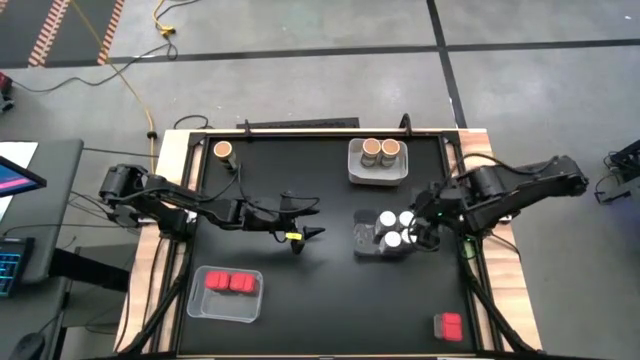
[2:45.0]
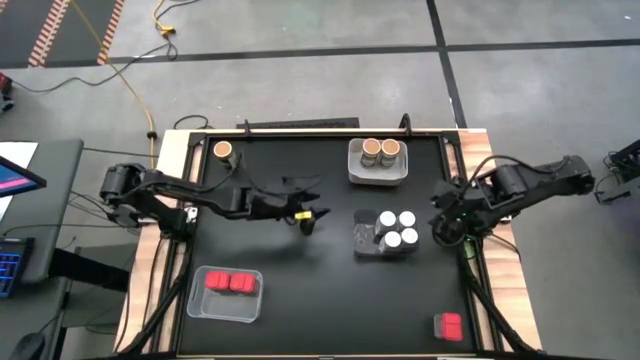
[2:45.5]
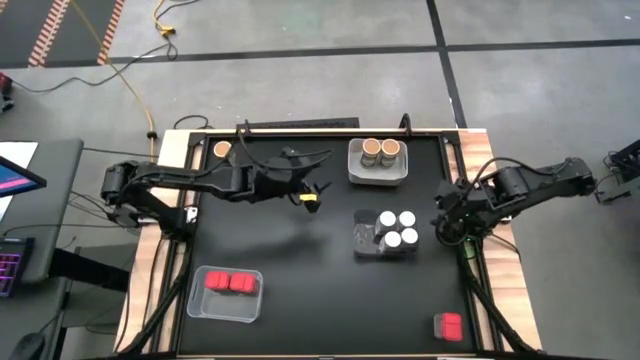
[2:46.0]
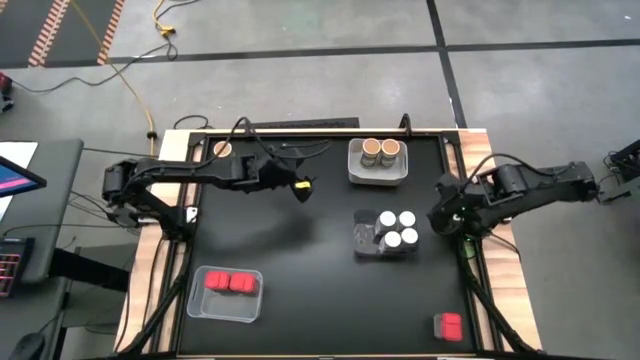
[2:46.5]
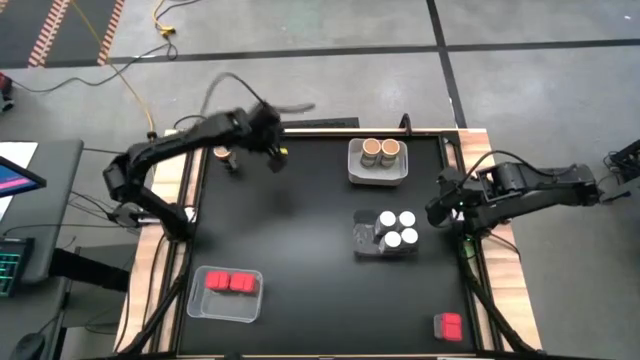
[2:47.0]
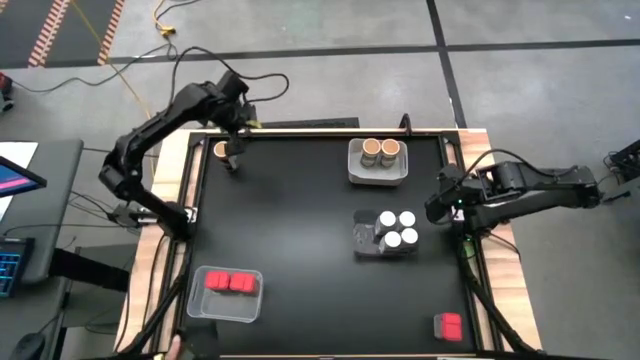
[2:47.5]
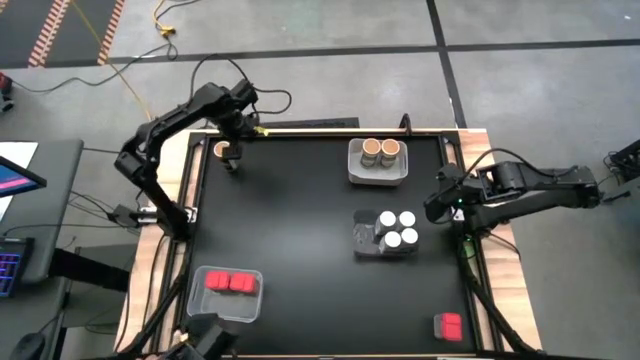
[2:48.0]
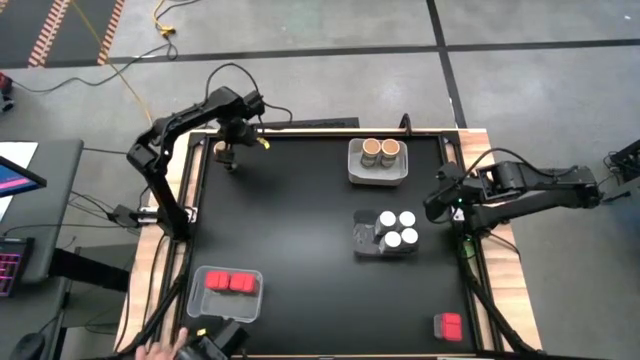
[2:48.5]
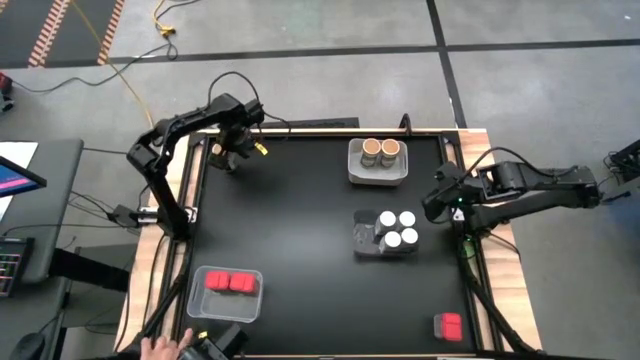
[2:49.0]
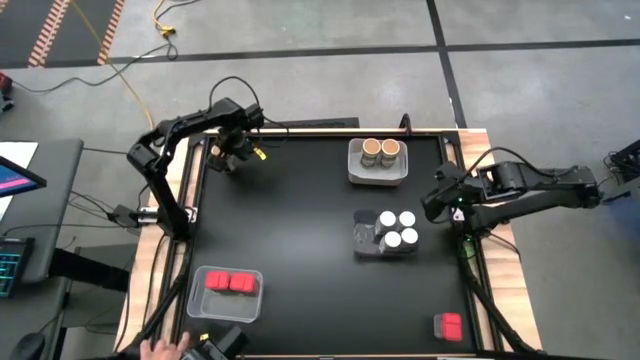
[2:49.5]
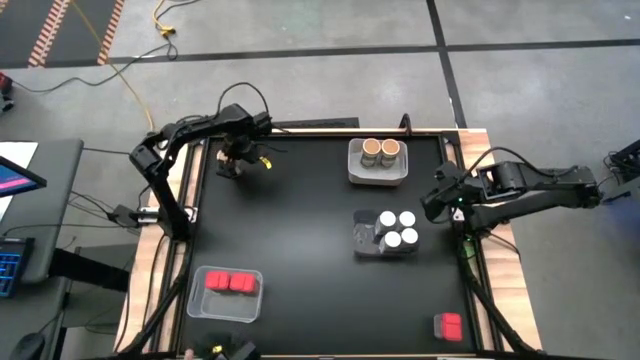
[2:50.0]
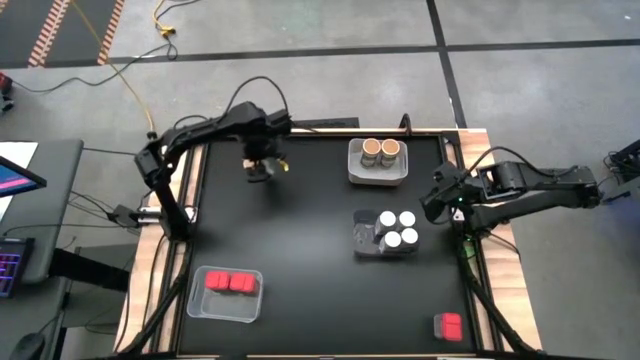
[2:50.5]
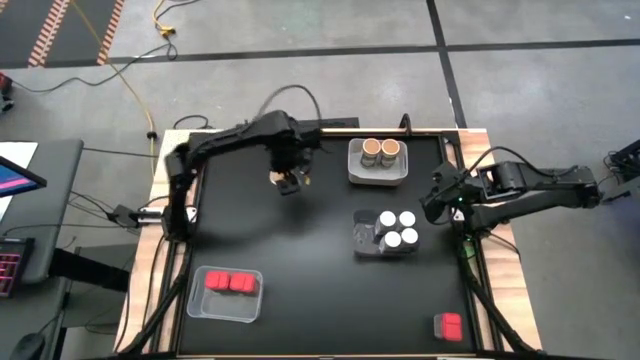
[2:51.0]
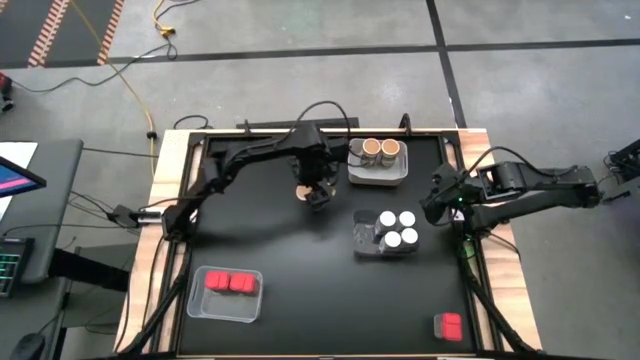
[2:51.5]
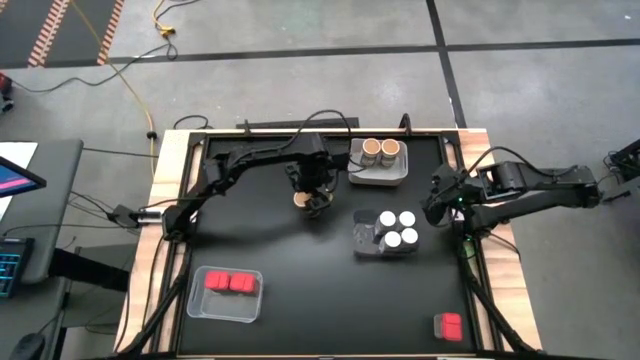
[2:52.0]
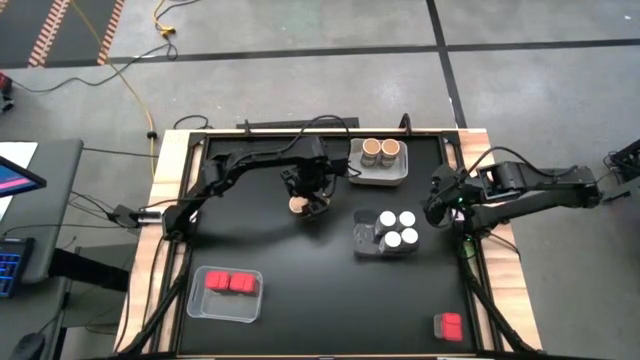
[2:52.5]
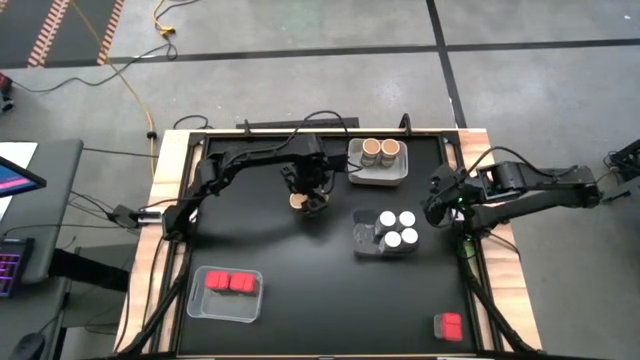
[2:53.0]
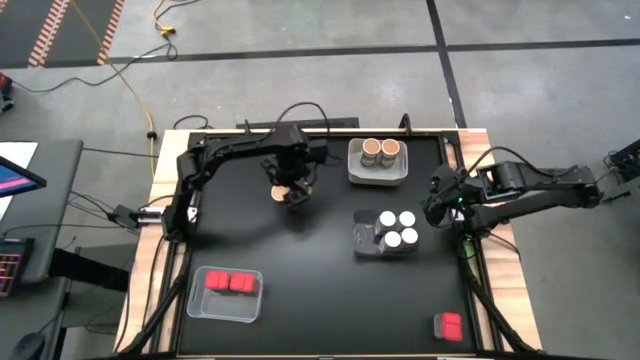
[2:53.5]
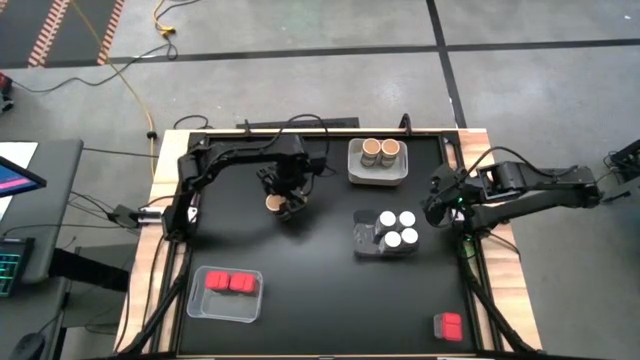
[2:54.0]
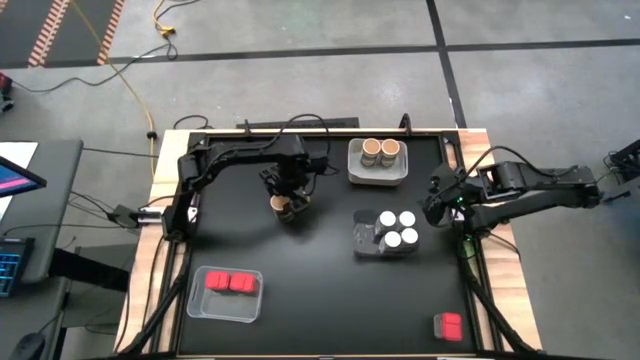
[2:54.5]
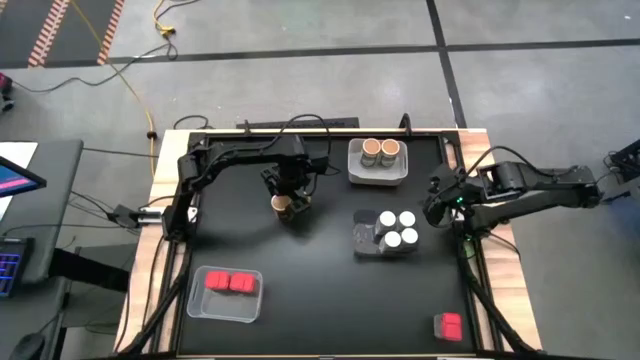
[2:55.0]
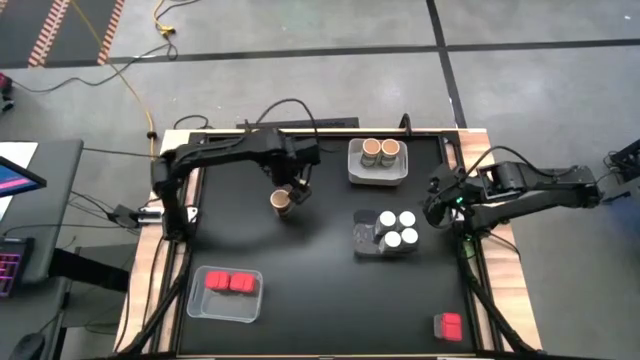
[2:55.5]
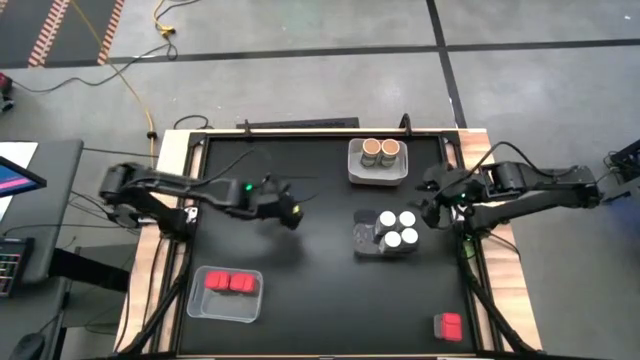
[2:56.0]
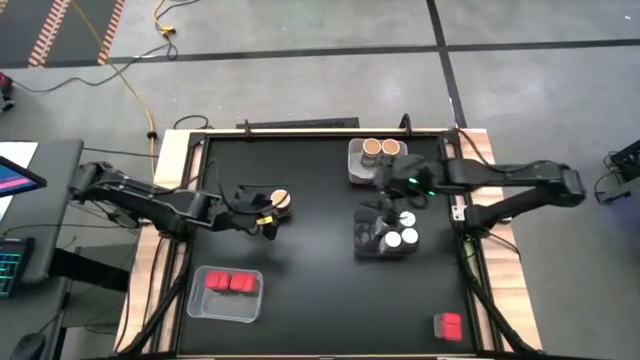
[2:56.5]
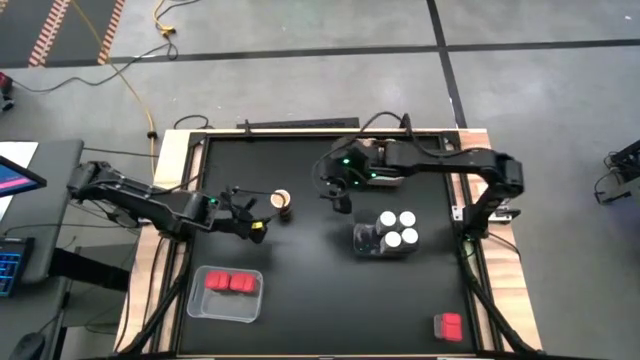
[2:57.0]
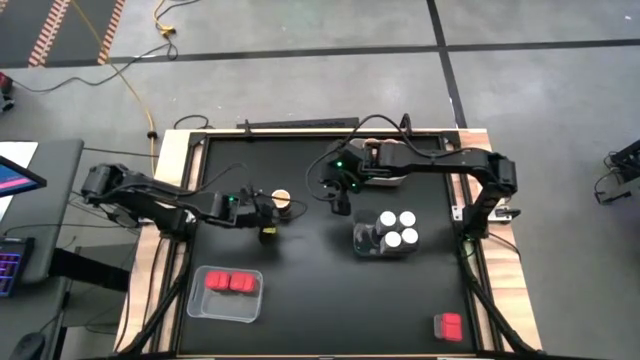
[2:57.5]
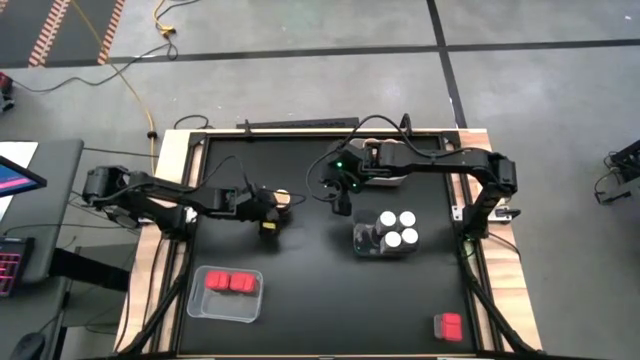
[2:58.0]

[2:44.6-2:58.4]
Task: Sort spices by type
Put the gold spice bottle in the gray bin

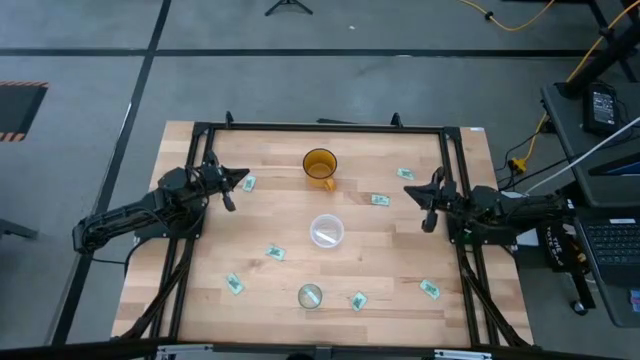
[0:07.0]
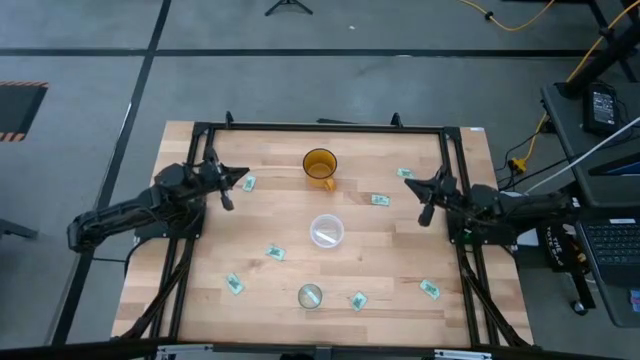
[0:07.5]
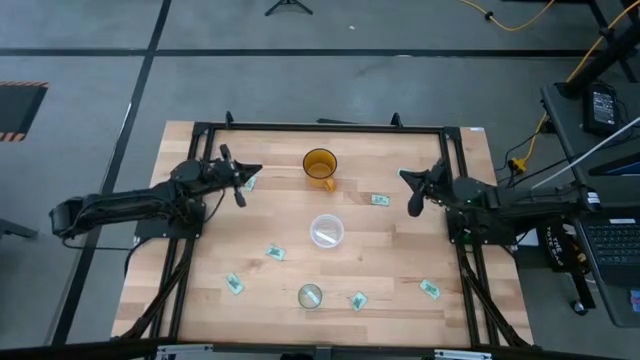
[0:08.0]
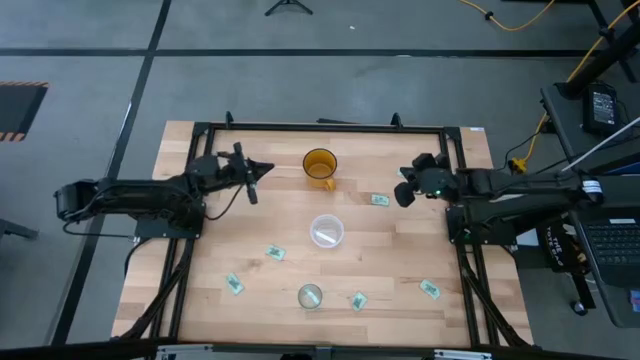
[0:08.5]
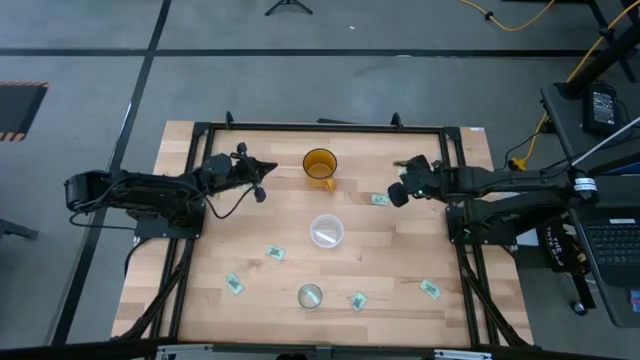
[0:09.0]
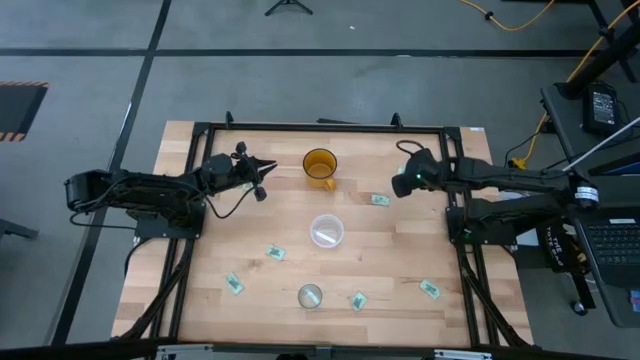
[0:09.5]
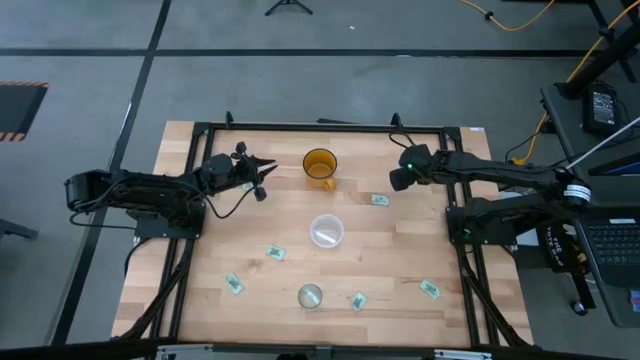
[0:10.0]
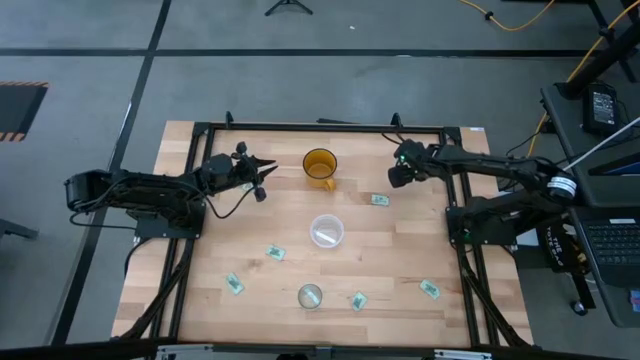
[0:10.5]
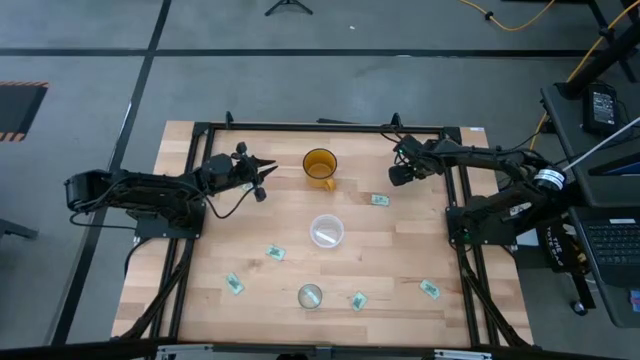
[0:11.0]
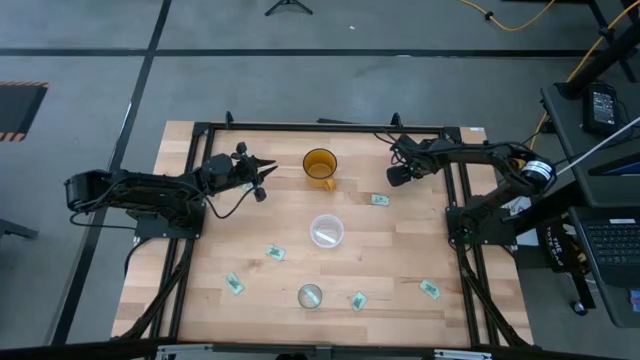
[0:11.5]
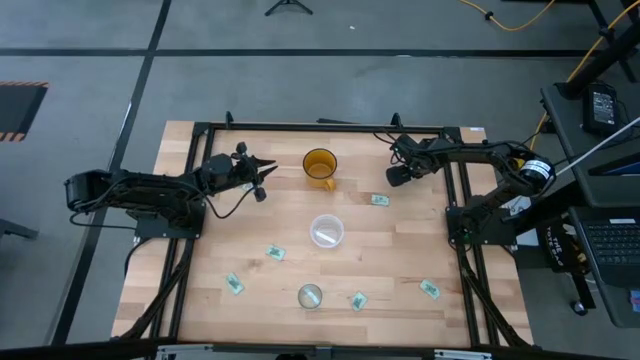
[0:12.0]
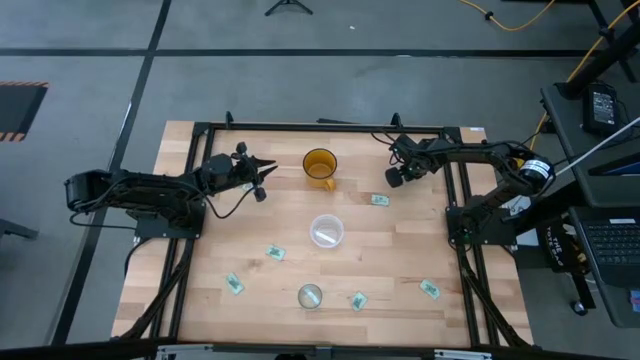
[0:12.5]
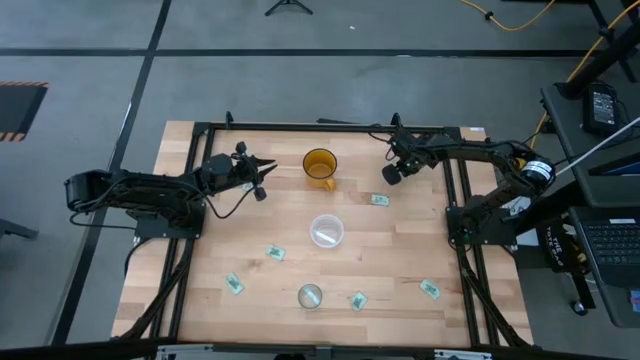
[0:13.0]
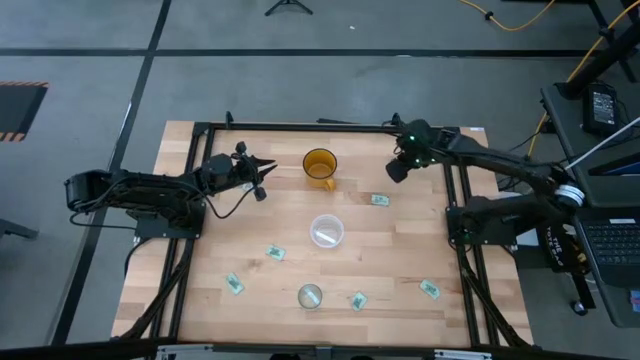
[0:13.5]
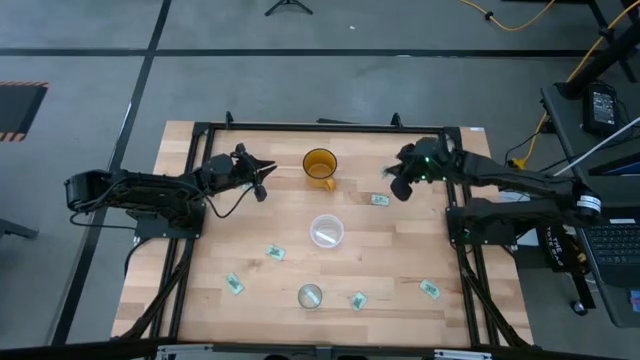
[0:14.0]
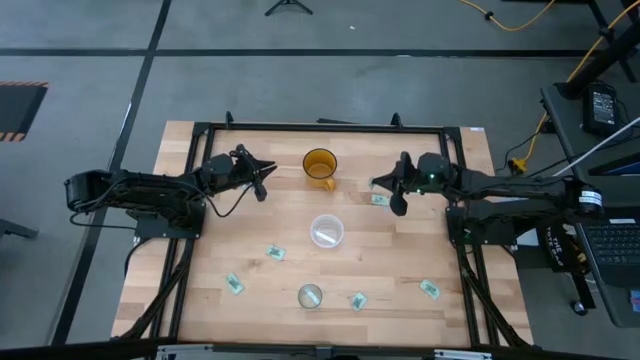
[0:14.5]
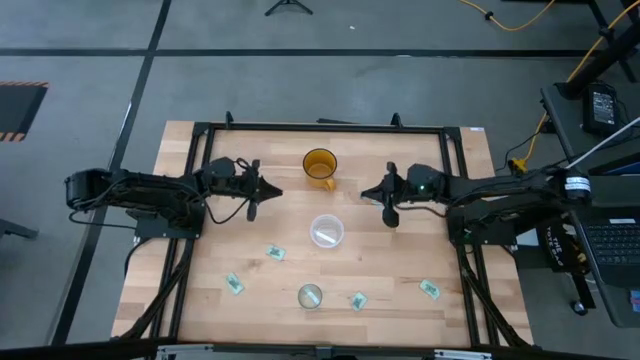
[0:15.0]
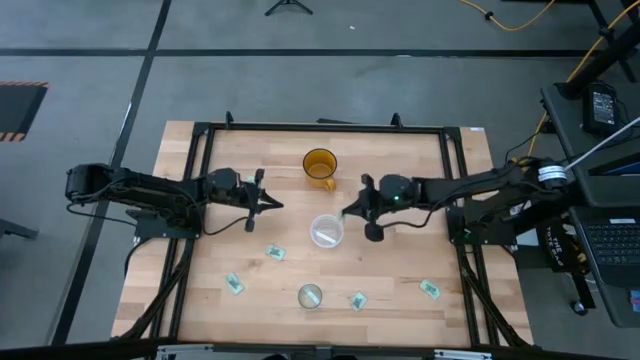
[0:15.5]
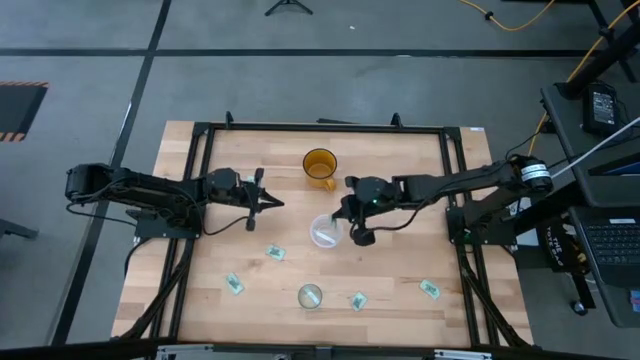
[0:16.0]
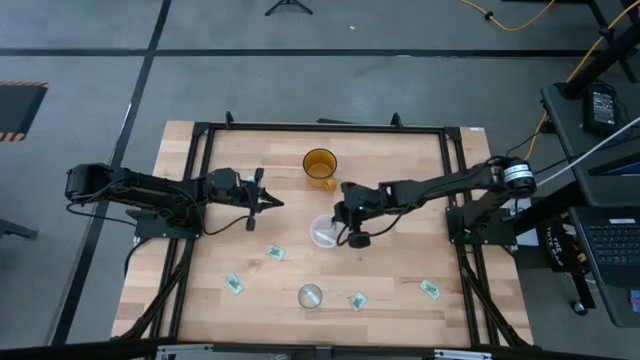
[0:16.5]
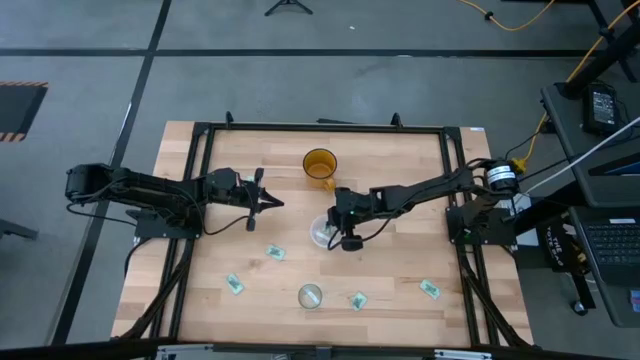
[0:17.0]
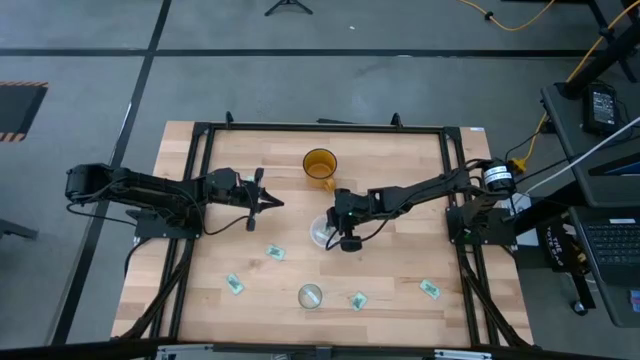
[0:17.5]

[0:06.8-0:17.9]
Task: Pick and place Stevia / Truvia into bins
Put the stevia packet into the transparent plastic container
